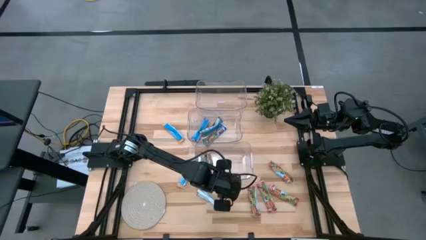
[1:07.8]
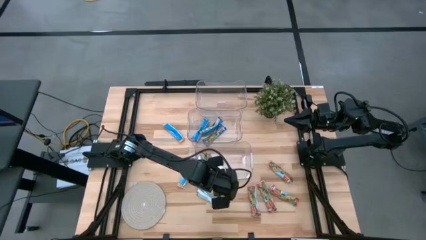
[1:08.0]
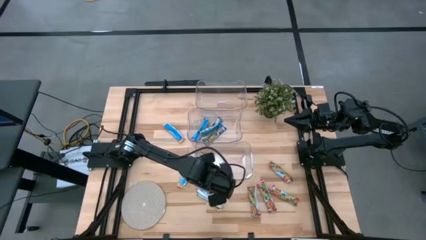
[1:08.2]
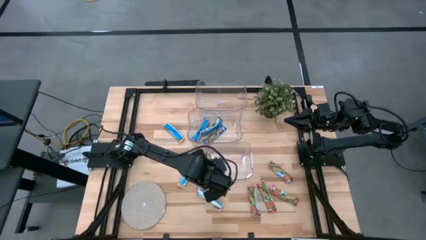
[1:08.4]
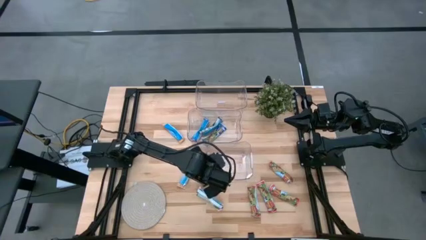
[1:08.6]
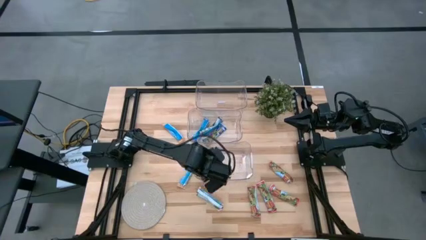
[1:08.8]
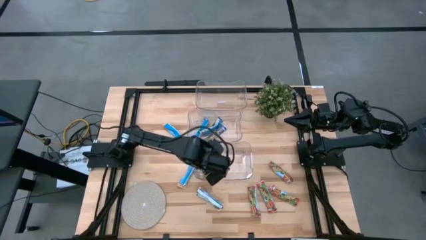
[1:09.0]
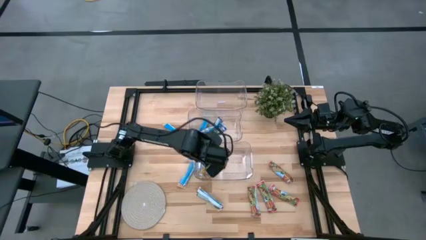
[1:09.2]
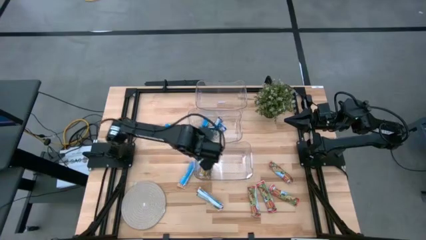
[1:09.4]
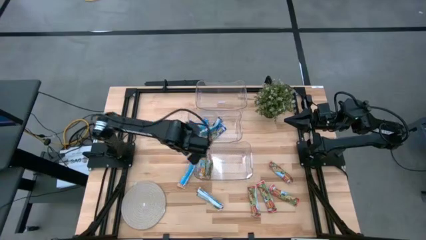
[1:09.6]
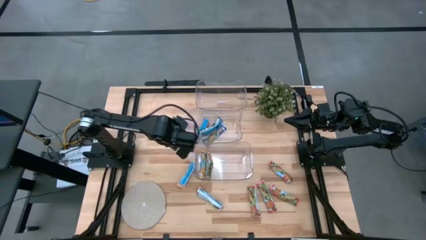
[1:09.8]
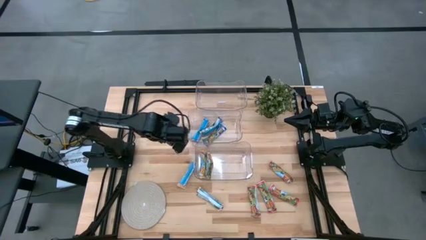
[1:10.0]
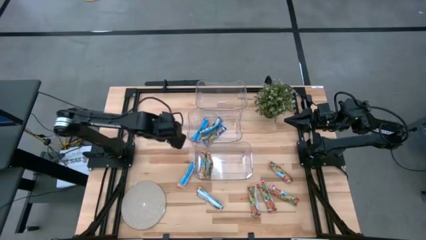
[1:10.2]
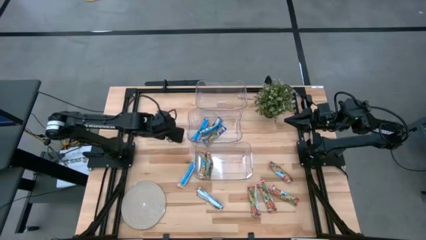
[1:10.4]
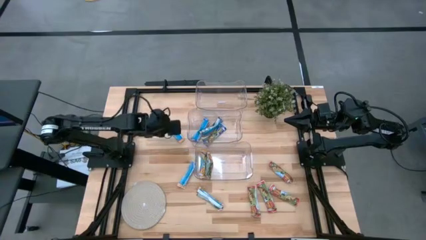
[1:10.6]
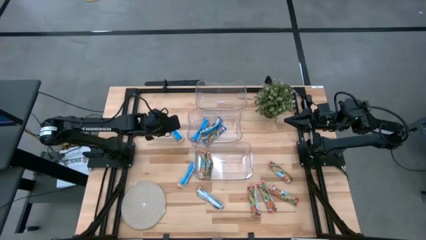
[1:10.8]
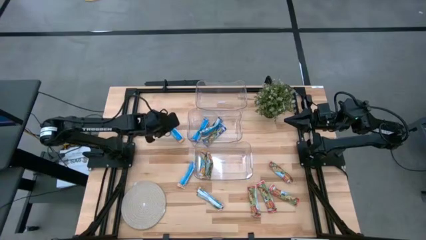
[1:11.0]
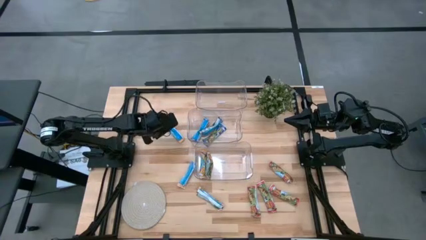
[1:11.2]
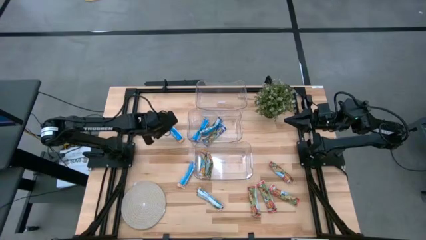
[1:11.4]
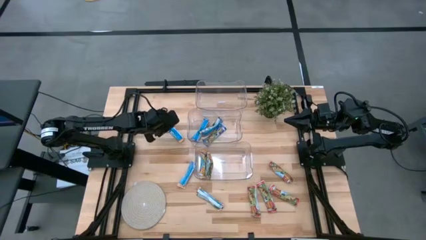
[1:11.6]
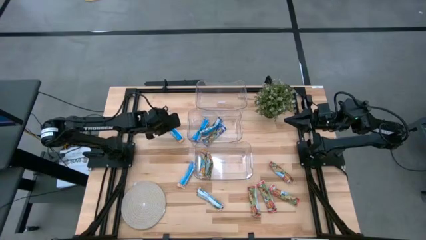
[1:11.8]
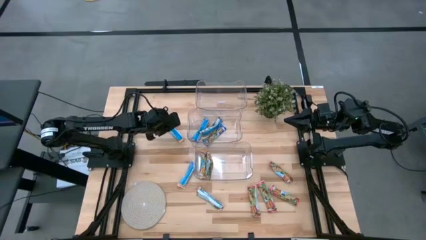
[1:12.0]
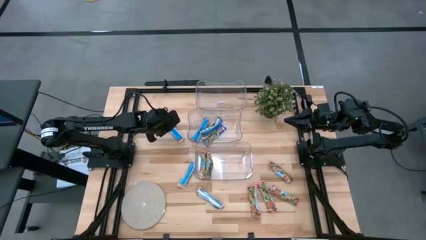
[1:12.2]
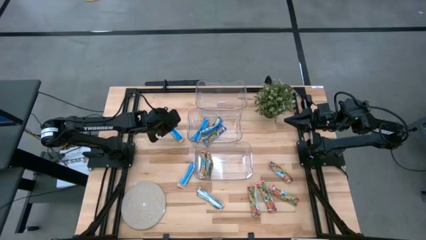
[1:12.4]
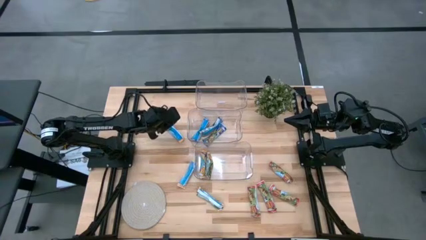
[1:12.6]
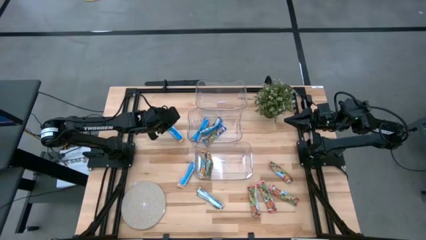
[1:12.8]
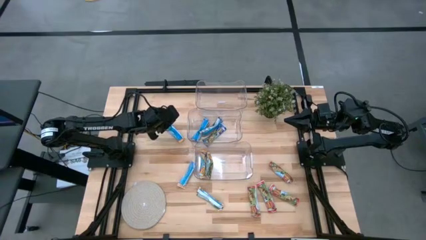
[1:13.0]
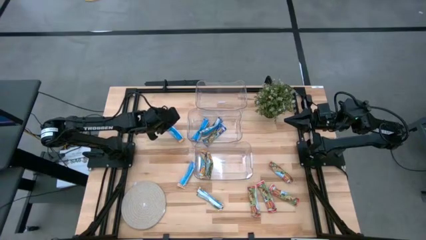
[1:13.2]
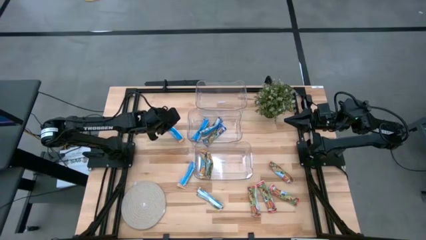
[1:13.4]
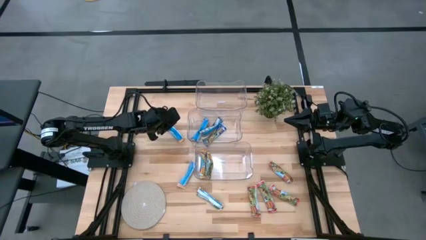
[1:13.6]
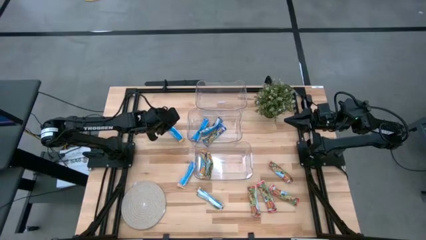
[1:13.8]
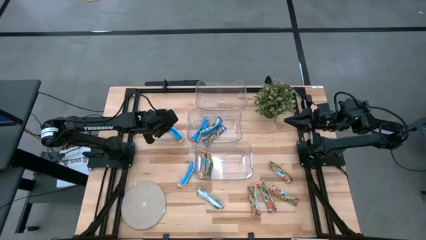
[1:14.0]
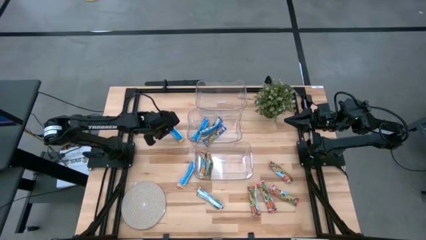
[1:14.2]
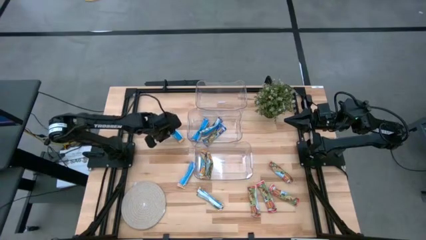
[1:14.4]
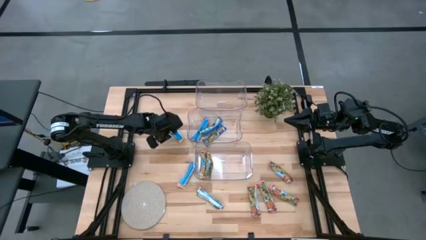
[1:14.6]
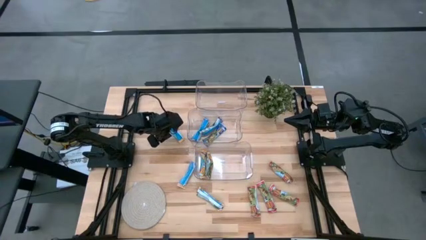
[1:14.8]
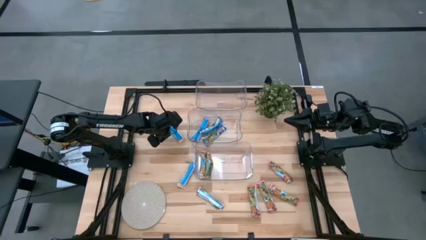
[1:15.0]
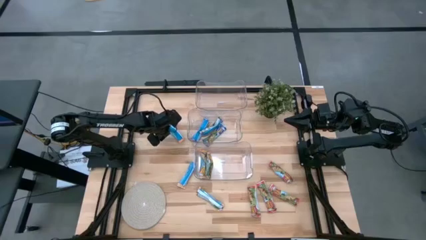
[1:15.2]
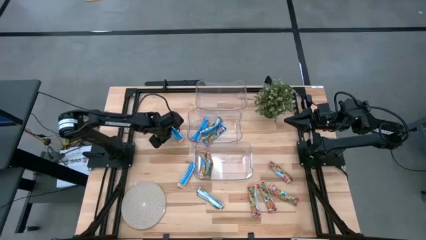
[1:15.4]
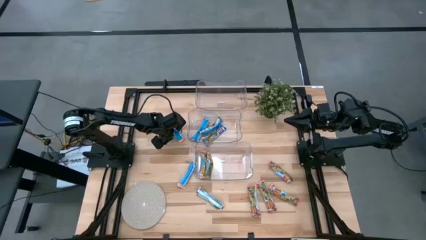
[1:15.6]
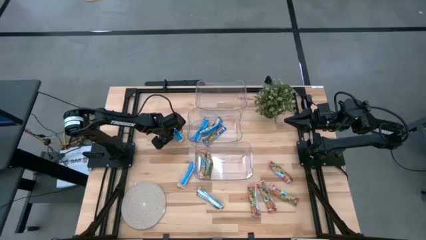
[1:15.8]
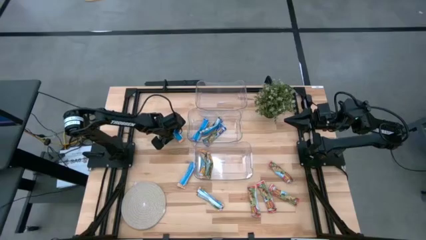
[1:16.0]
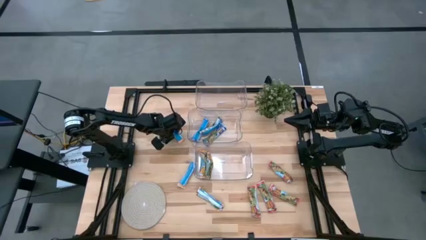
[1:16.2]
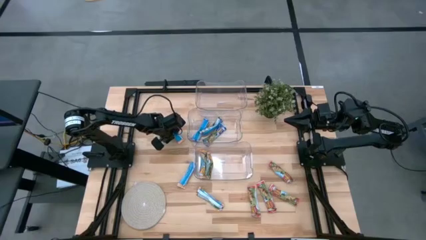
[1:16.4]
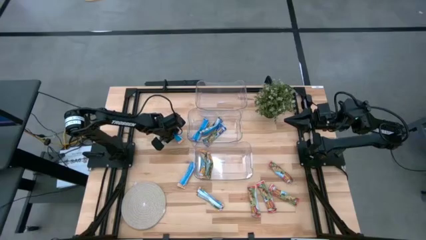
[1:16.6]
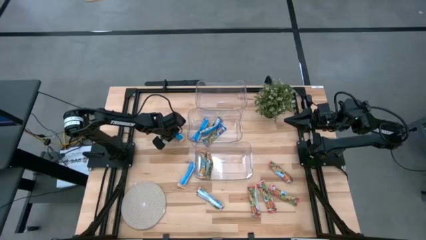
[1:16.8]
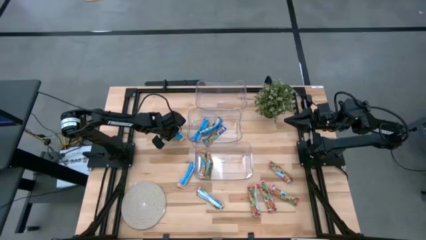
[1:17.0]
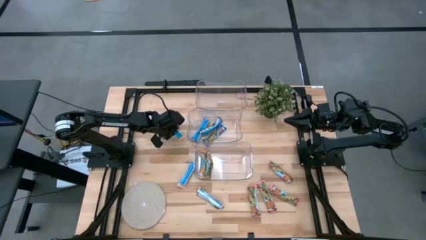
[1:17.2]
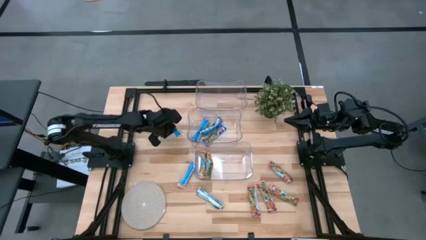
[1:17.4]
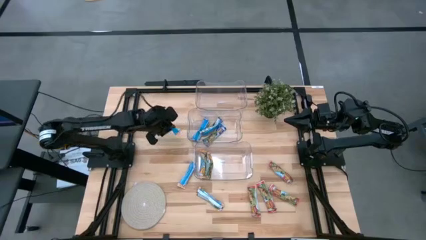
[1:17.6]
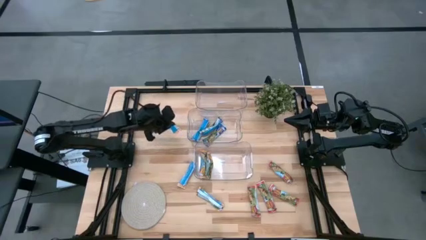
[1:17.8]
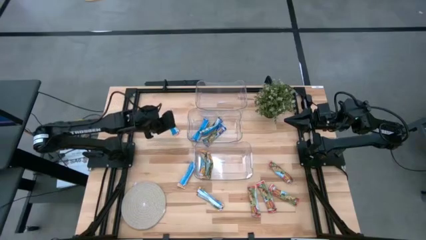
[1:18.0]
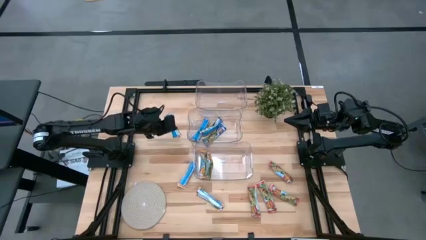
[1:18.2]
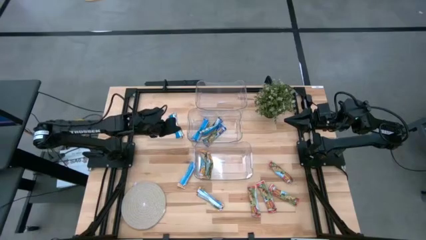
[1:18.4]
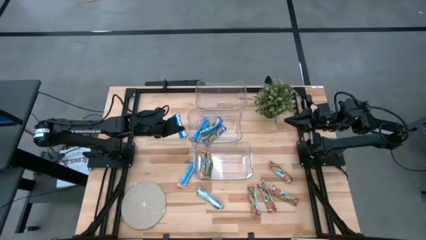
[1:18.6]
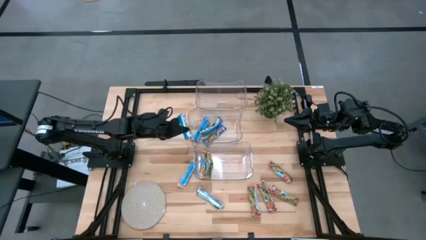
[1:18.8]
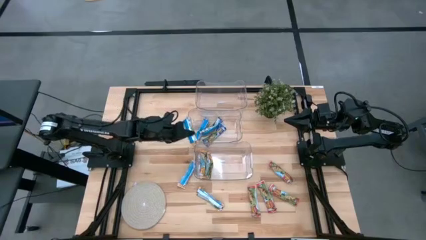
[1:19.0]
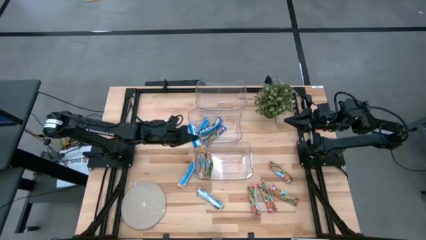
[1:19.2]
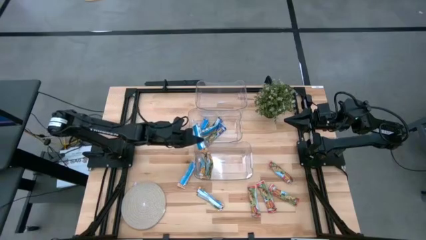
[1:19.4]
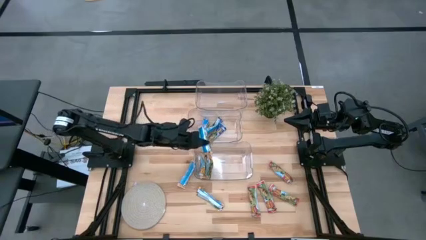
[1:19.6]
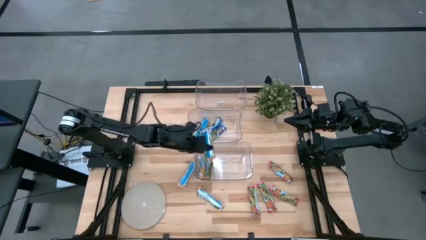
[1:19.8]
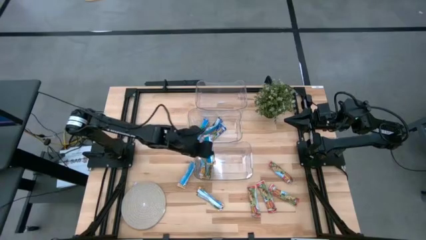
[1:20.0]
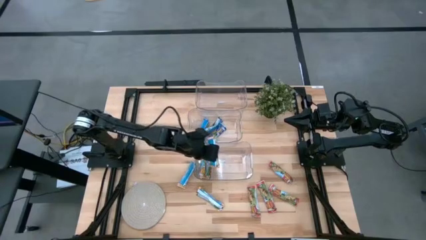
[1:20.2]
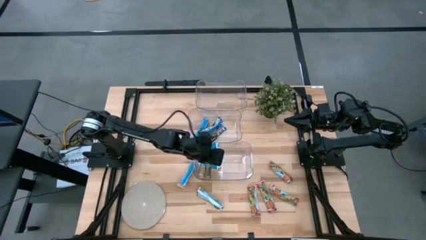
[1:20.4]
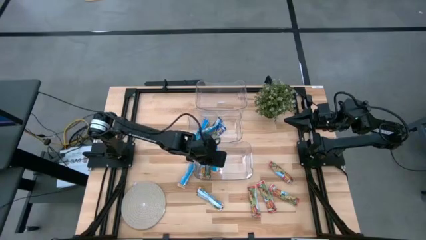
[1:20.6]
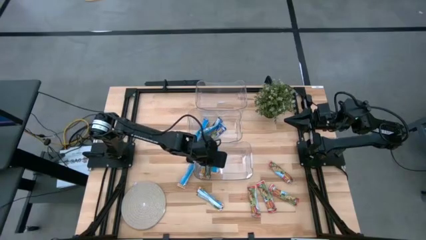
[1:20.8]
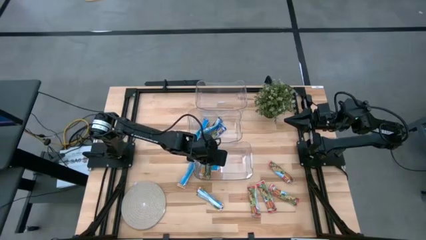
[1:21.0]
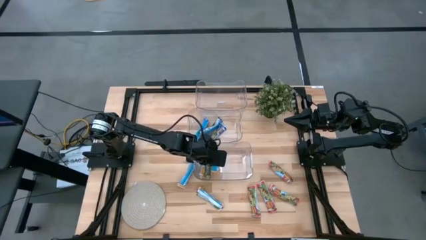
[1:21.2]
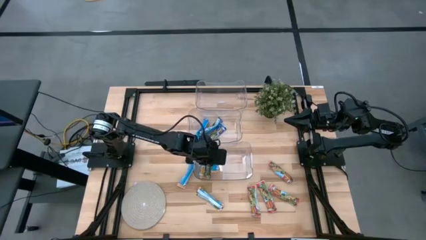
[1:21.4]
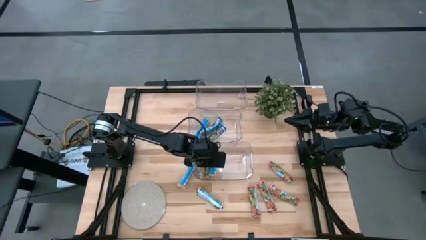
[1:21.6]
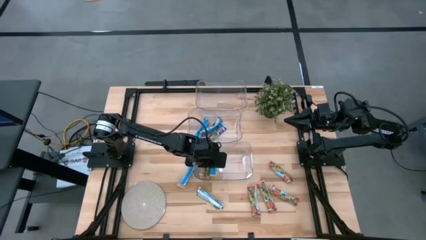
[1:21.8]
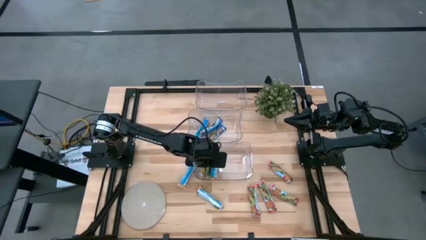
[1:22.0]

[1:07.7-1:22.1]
Task: Pick and place Granola Bars by type
Put the yellow granola bar into the bottom transparent bin

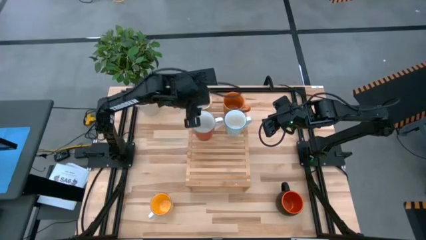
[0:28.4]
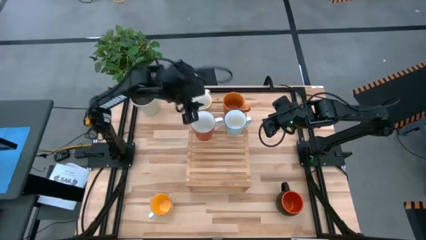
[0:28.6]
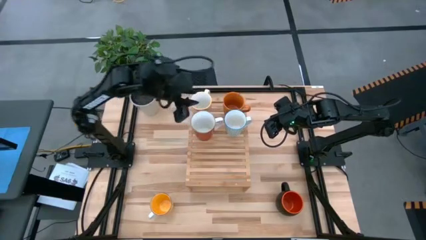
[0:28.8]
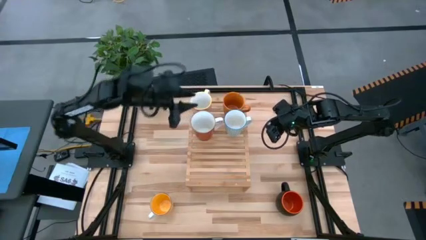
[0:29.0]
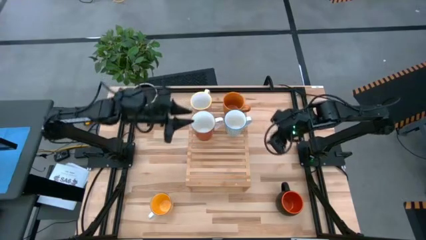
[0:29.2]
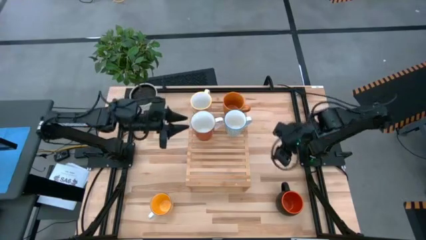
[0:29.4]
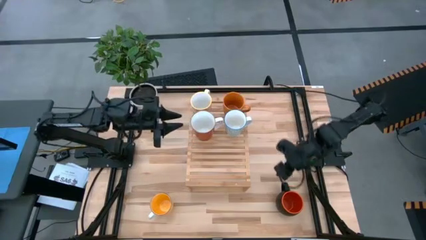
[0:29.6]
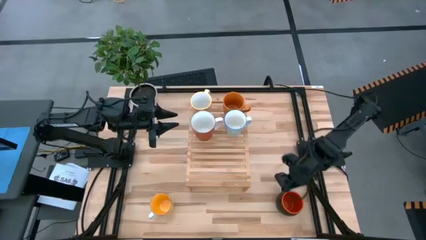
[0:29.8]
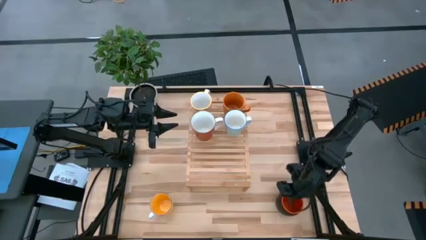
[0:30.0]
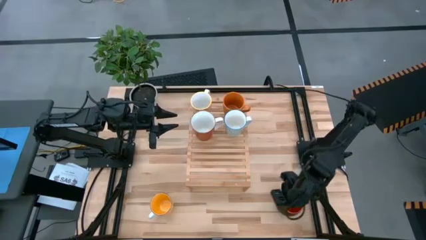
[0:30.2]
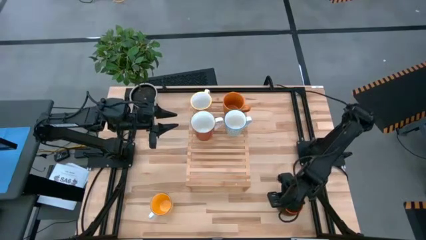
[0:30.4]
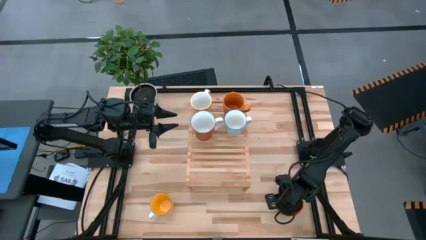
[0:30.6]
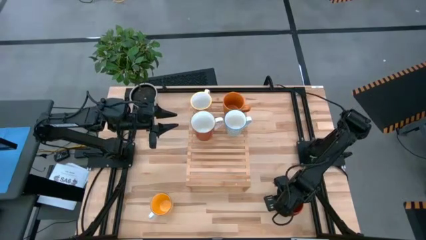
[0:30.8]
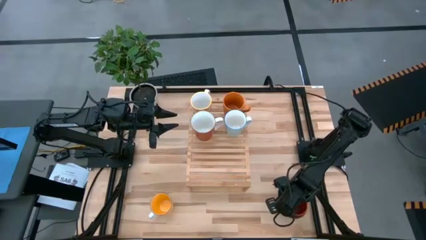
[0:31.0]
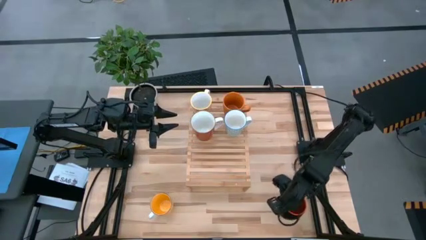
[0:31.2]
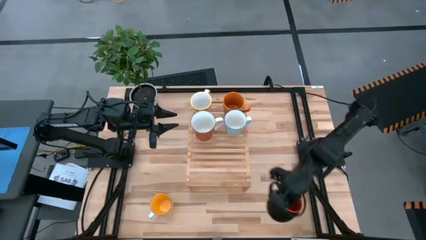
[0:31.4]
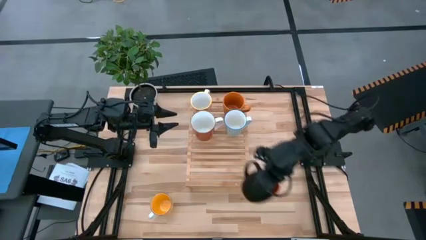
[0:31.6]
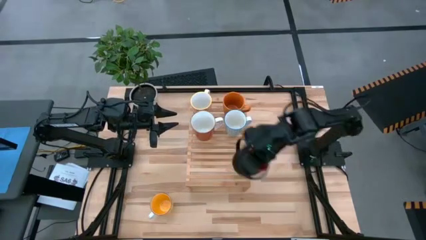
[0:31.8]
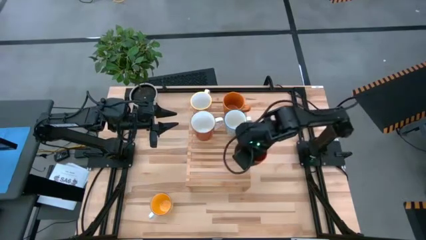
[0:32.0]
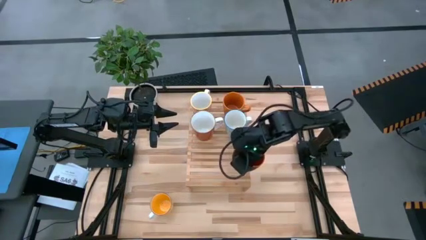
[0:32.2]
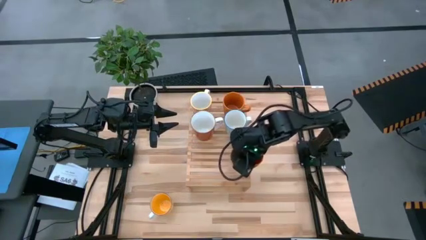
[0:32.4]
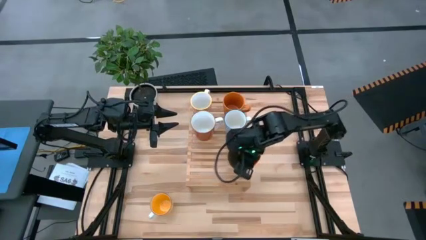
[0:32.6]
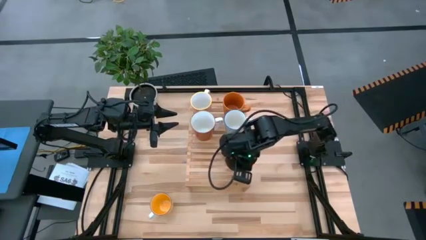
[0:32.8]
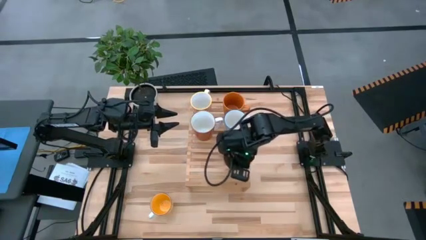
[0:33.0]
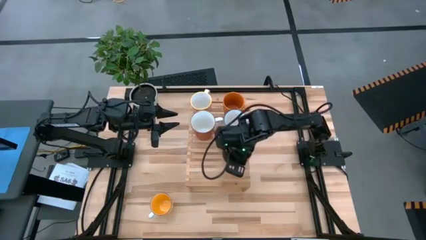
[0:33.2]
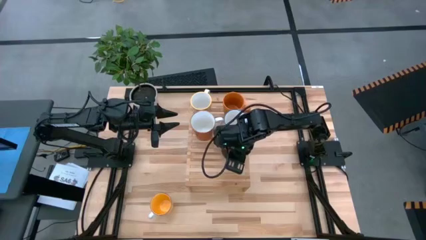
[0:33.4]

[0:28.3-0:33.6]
Task: Place coffee mugs
Put the black cup on the shelf aligned with the other blue cup
